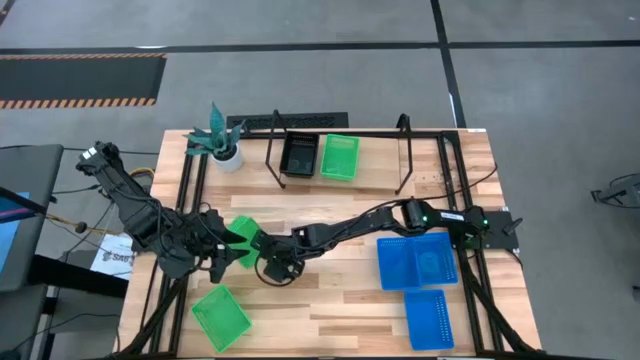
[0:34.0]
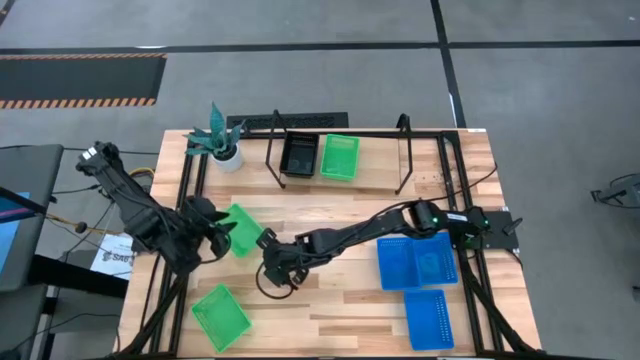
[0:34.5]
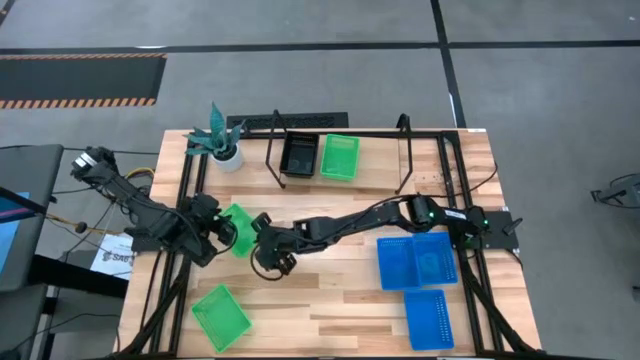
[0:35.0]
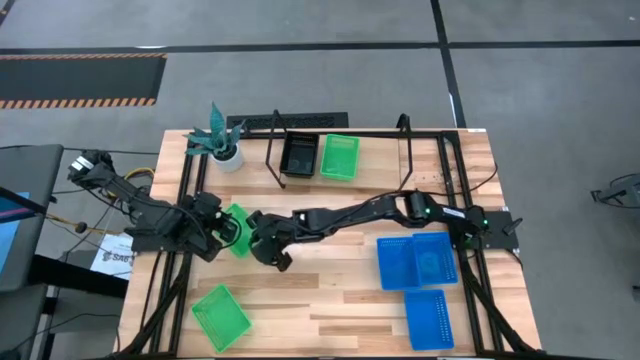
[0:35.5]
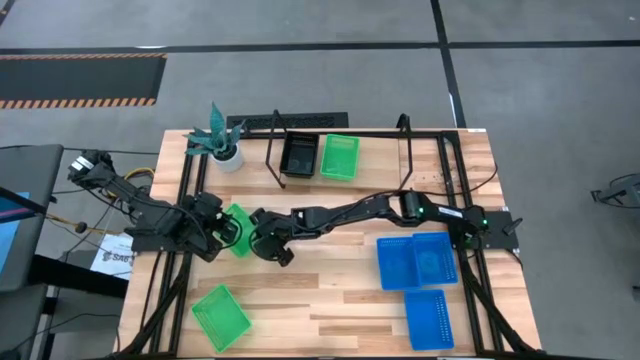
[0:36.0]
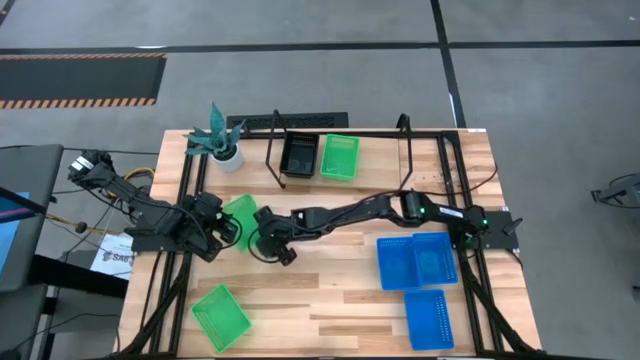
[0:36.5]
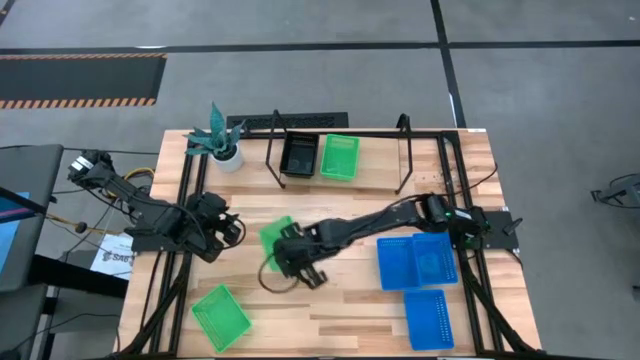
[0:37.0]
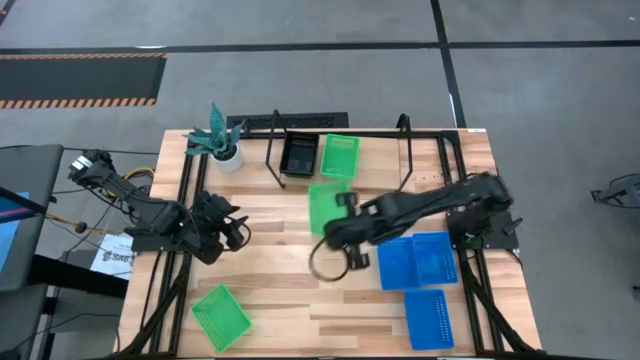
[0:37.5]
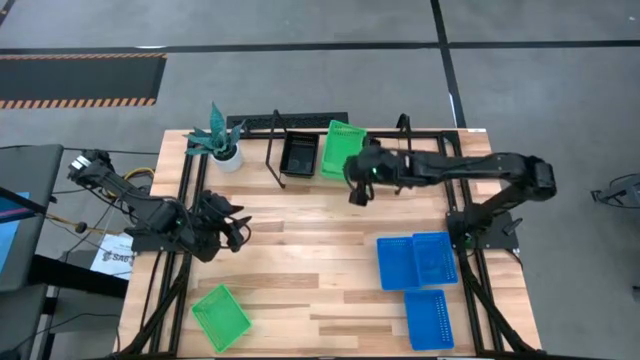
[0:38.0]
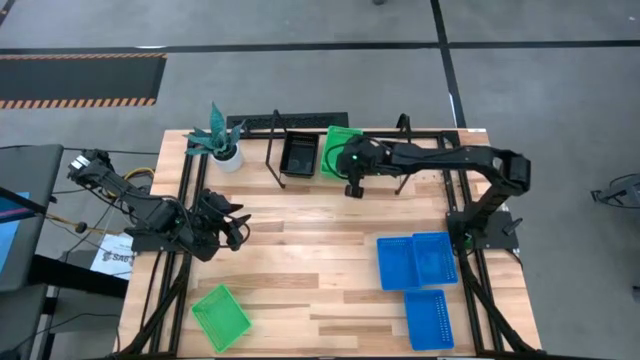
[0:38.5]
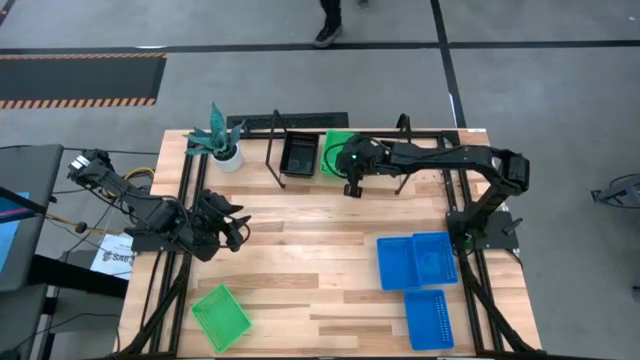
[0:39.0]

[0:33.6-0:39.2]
Task: Stack baskets on shelf by color
Stack the top green basket on top of the other green basket on the shelf

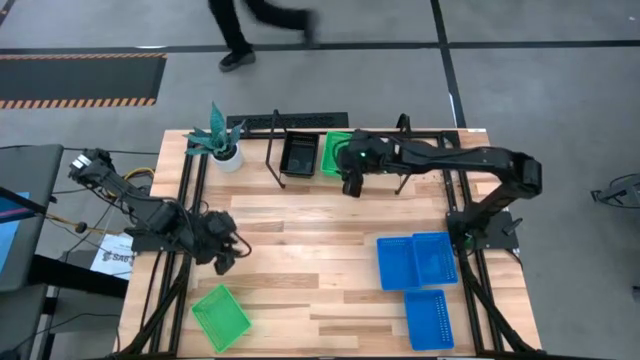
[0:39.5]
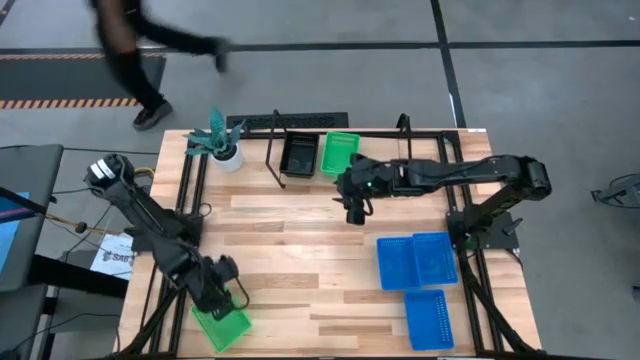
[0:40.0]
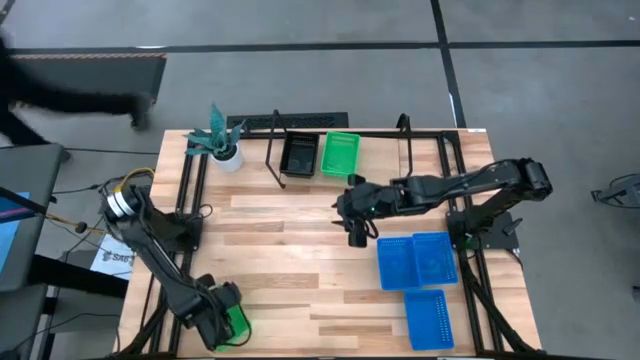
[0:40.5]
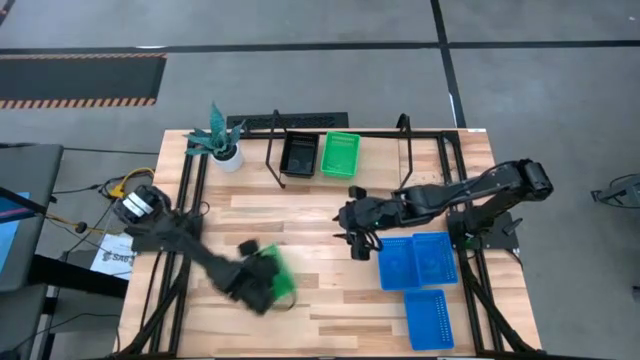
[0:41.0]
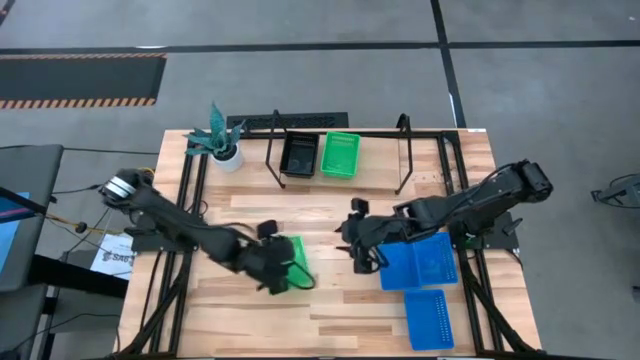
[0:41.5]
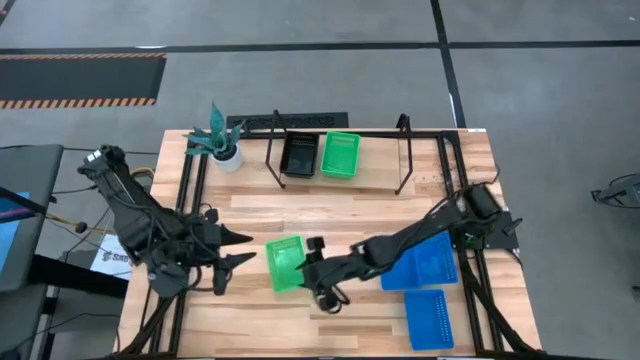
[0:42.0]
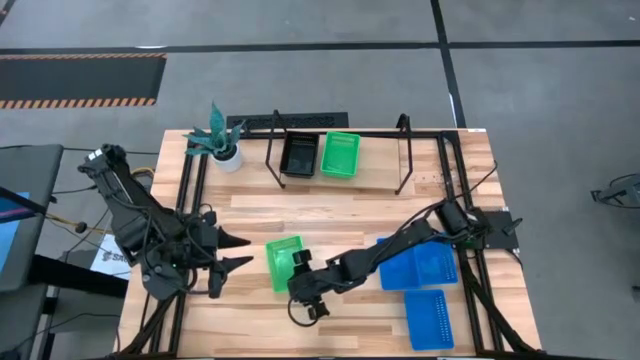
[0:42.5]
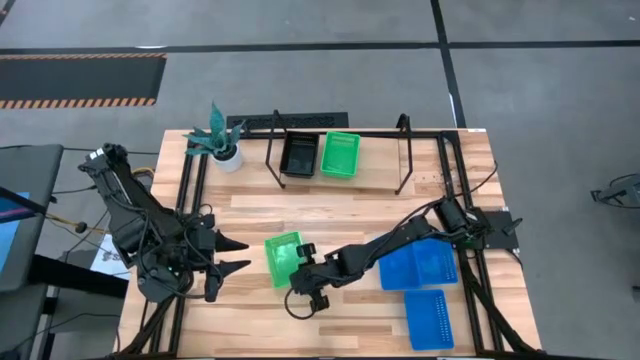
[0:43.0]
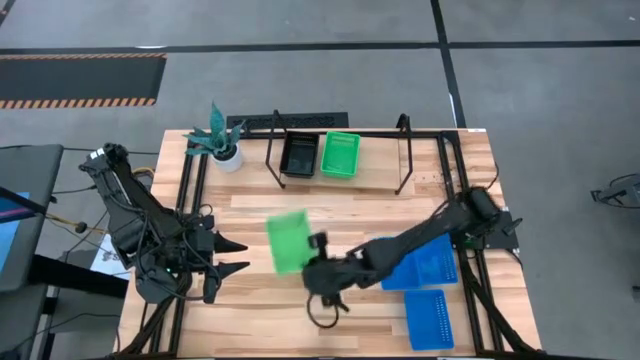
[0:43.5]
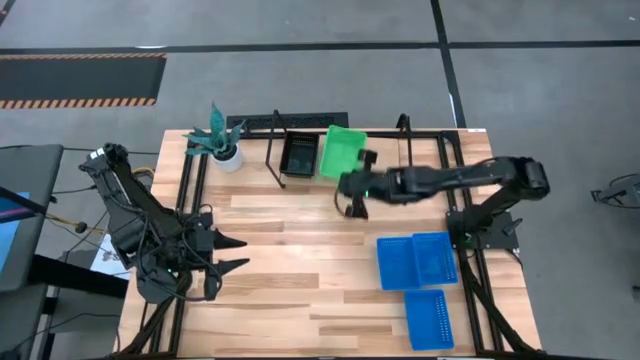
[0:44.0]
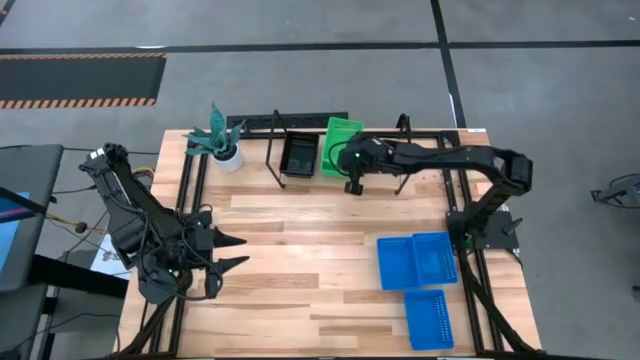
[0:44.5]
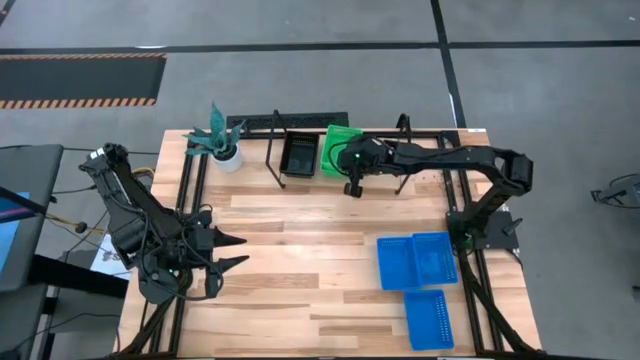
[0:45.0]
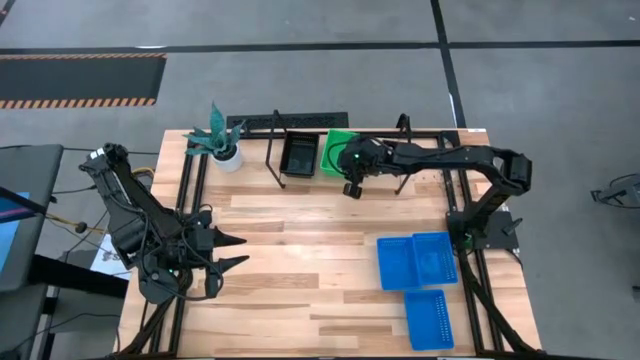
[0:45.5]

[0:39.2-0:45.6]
Stack the green basket on top of the other green baskets on the shelf

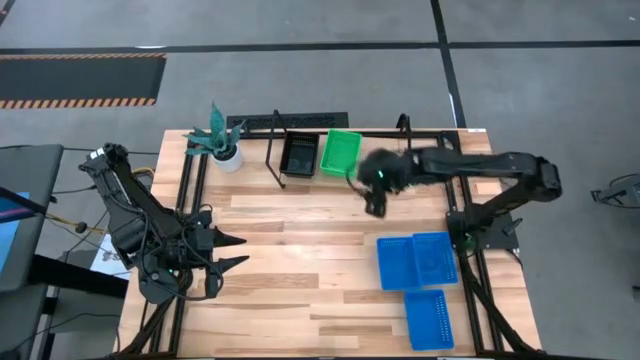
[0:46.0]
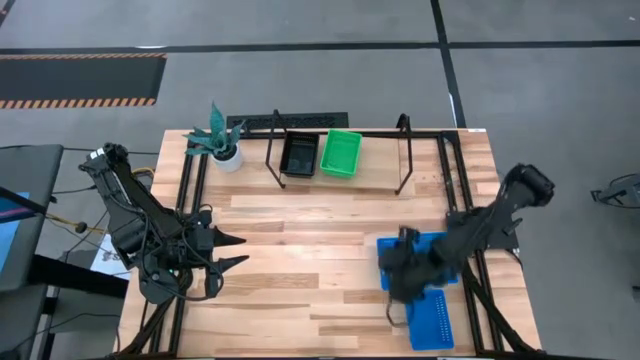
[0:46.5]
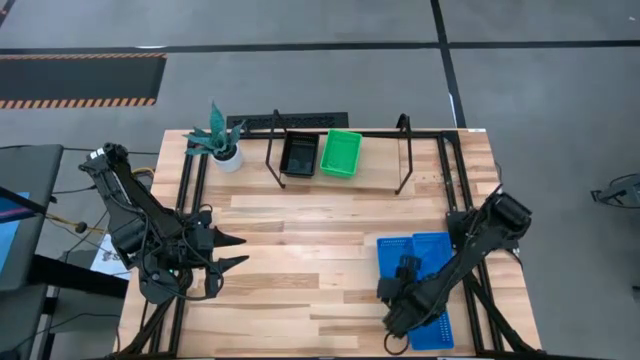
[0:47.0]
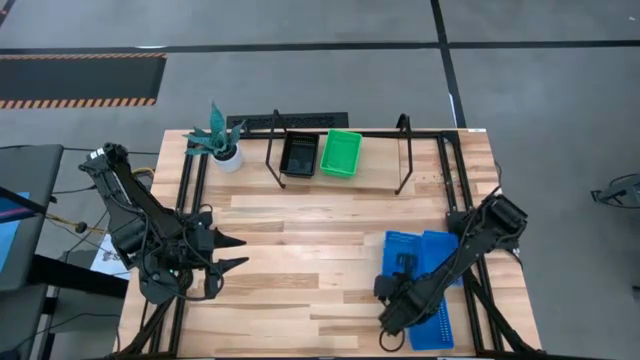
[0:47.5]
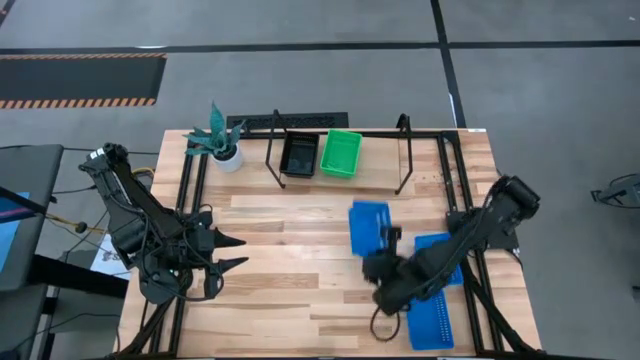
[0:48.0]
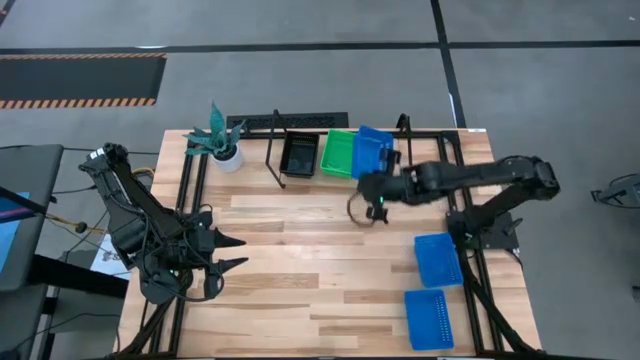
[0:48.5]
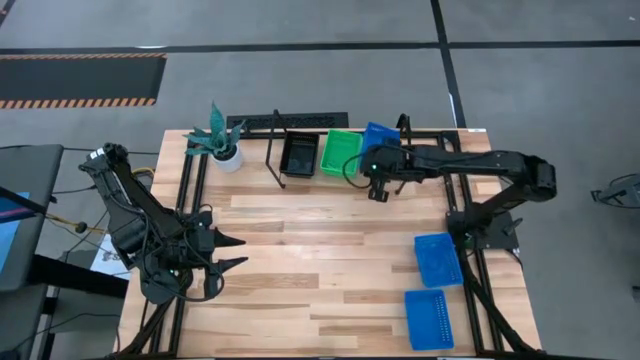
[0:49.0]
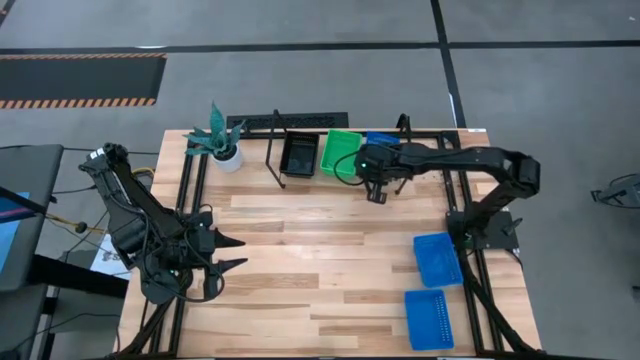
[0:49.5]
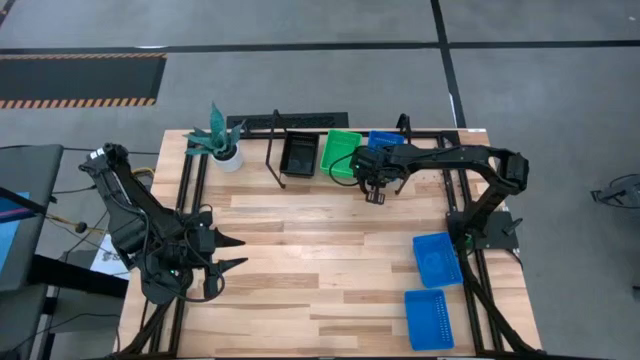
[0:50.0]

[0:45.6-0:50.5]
Put the top left blue basket on top of the other shelf

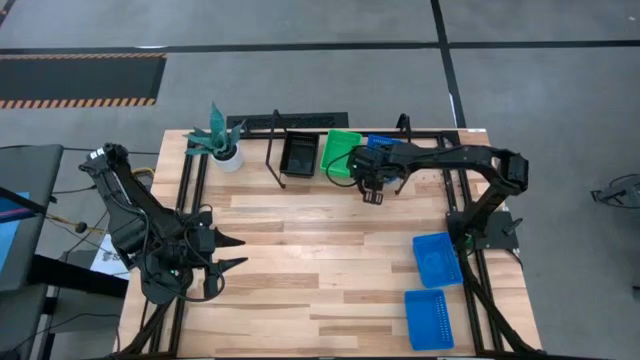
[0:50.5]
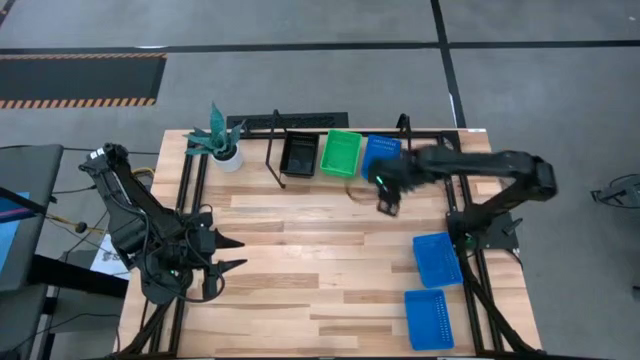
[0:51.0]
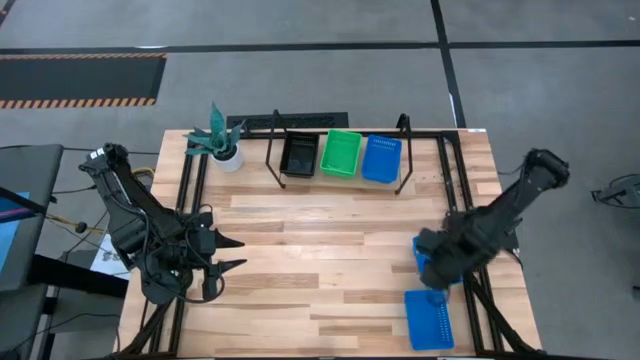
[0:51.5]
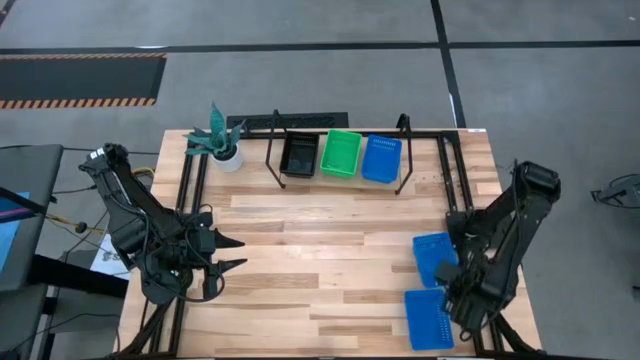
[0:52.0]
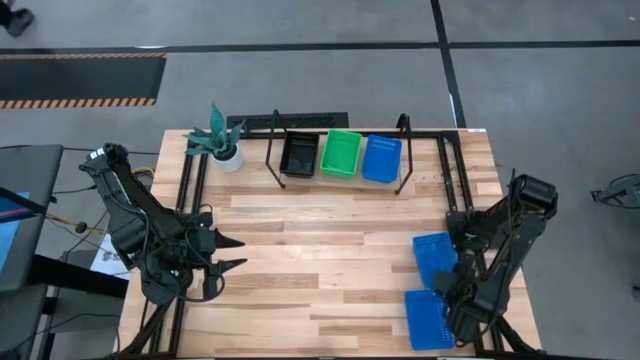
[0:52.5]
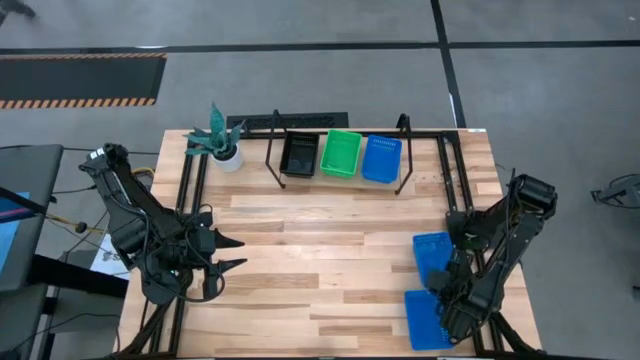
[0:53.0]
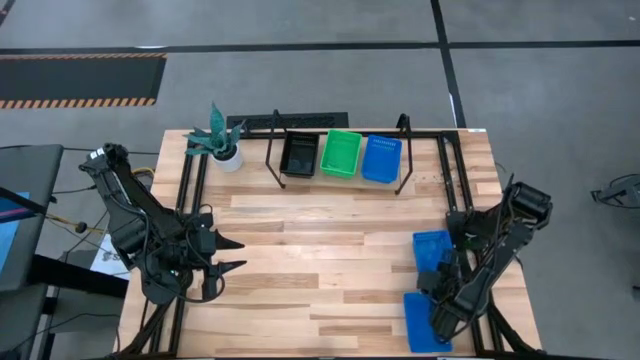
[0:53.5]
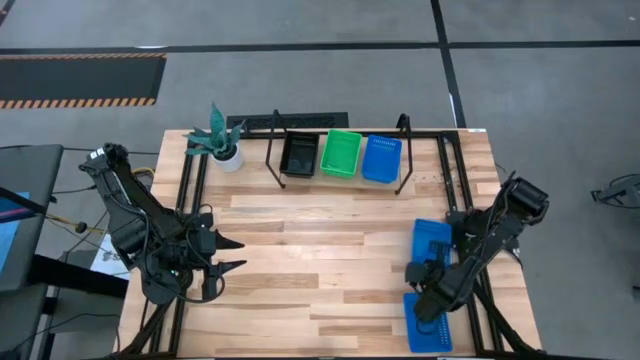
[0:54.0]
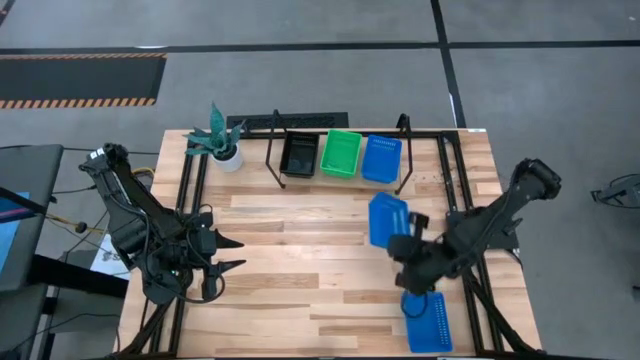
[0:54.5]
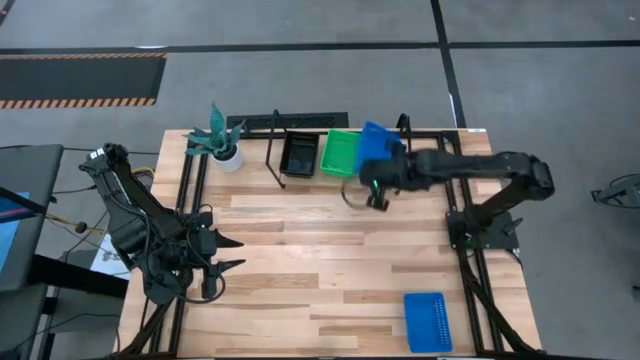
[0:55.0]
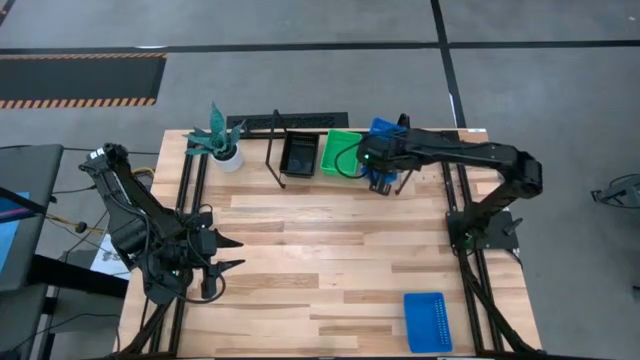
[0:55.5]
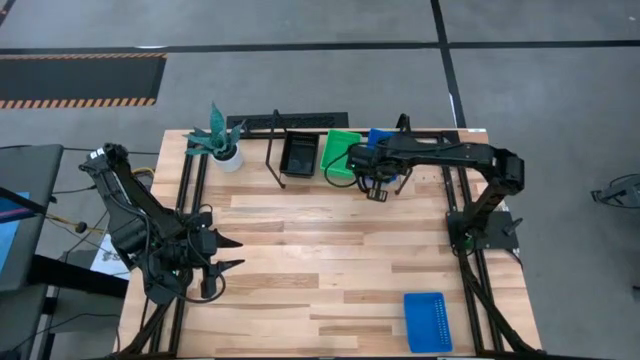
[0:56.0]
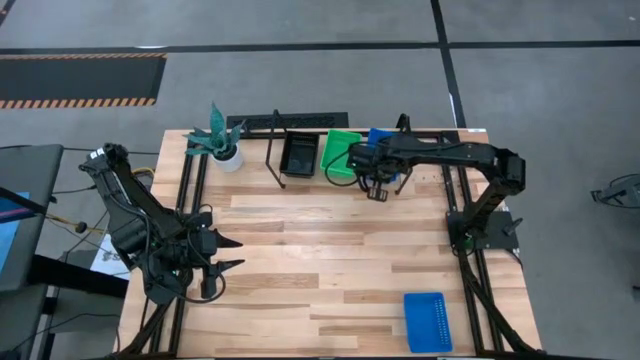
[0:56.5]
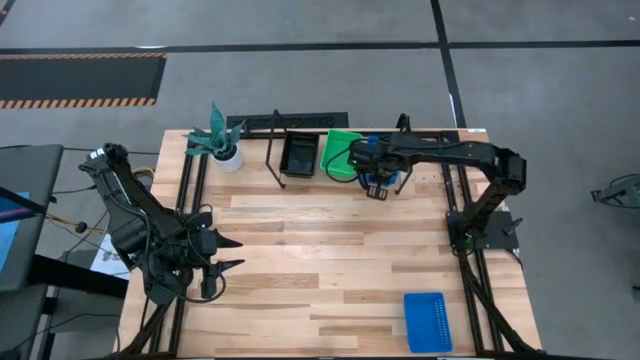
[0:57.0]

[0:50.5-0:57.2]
Stack the top blue basket on top of the other blue basket on the shelf
